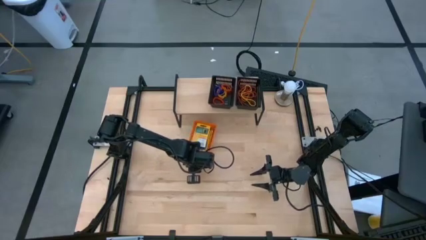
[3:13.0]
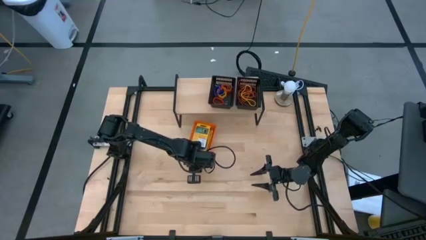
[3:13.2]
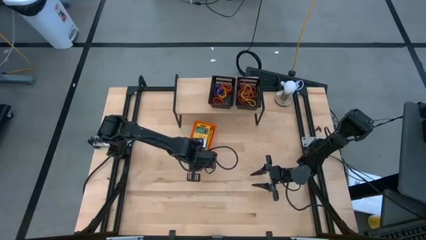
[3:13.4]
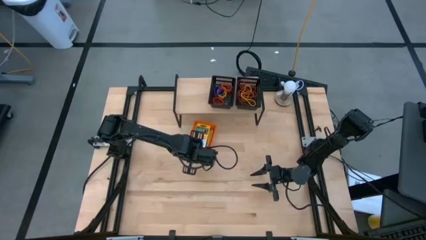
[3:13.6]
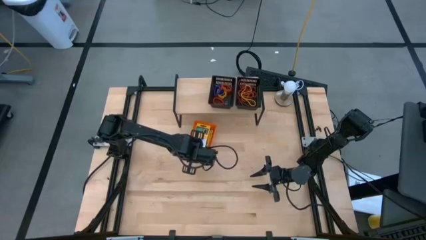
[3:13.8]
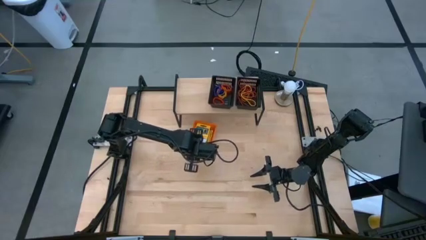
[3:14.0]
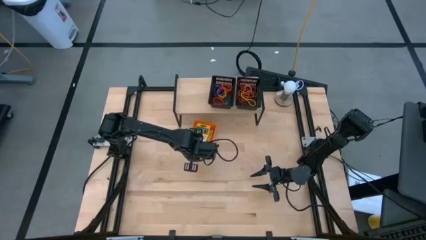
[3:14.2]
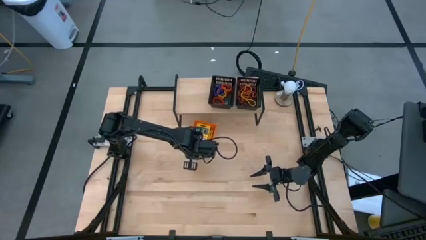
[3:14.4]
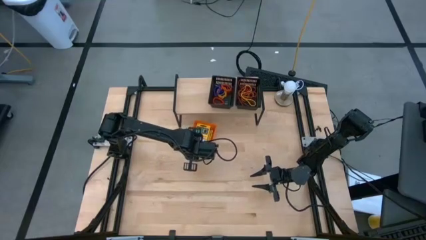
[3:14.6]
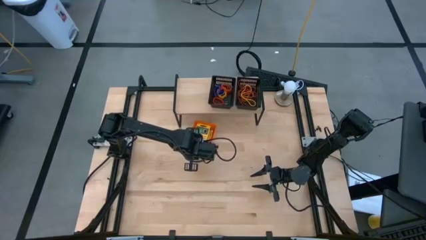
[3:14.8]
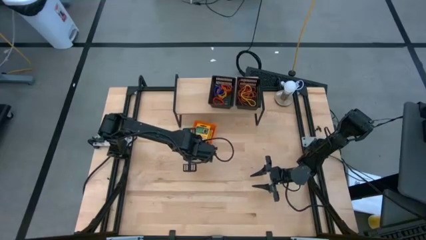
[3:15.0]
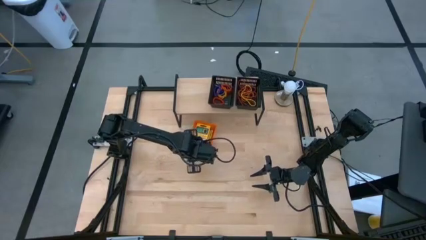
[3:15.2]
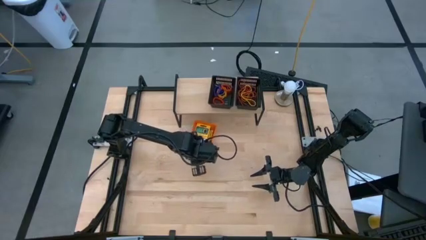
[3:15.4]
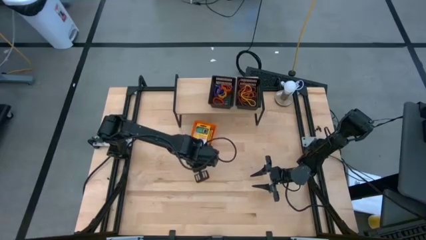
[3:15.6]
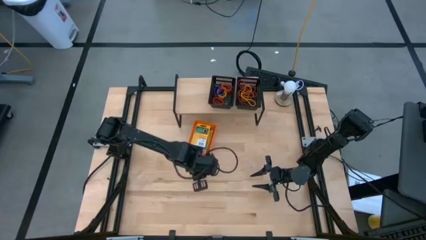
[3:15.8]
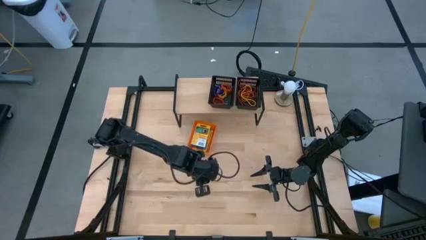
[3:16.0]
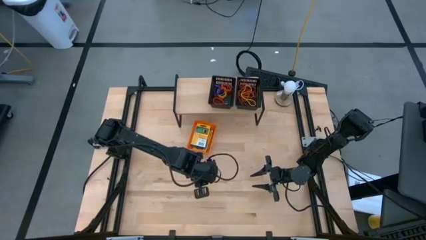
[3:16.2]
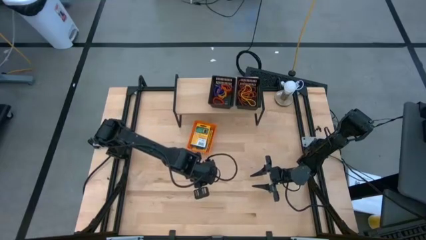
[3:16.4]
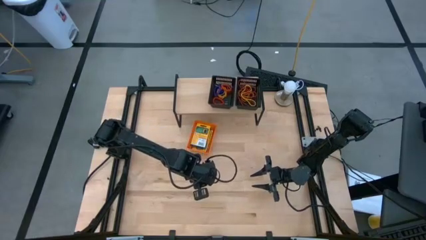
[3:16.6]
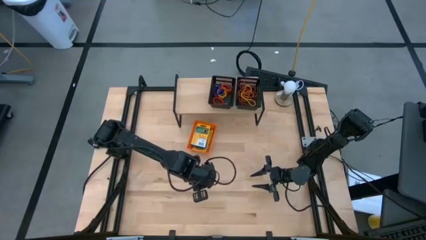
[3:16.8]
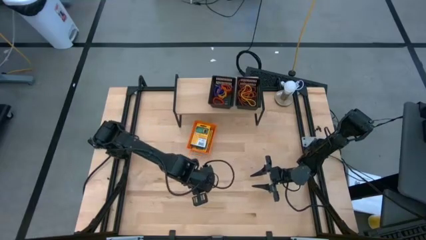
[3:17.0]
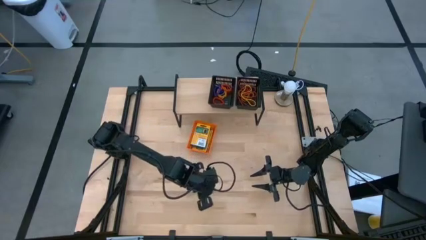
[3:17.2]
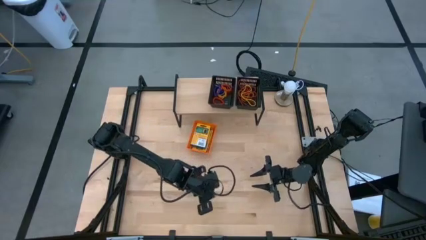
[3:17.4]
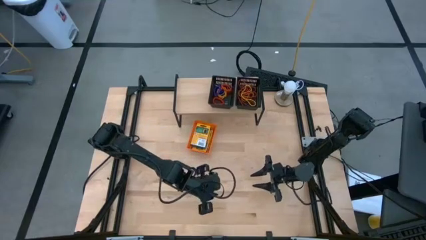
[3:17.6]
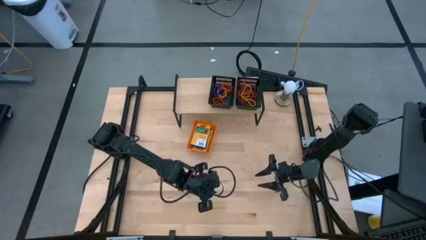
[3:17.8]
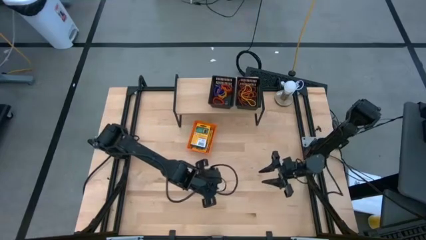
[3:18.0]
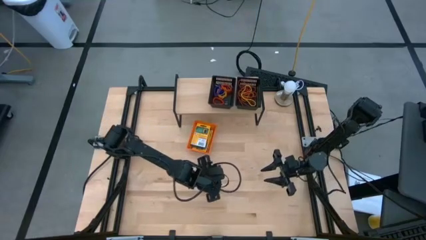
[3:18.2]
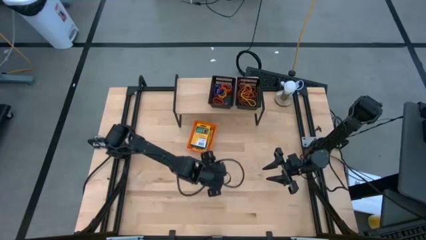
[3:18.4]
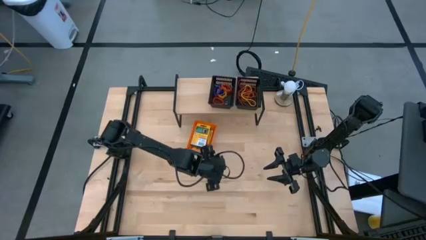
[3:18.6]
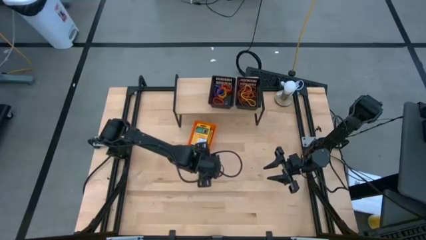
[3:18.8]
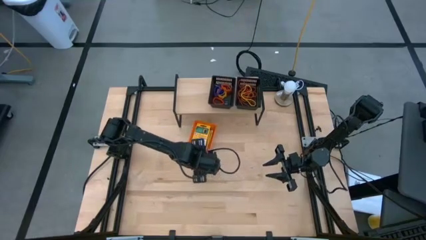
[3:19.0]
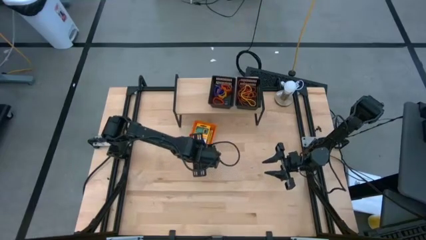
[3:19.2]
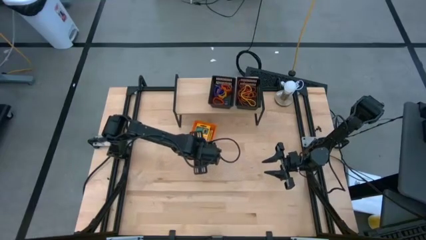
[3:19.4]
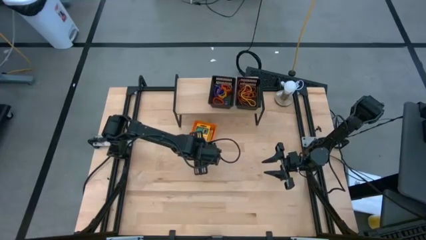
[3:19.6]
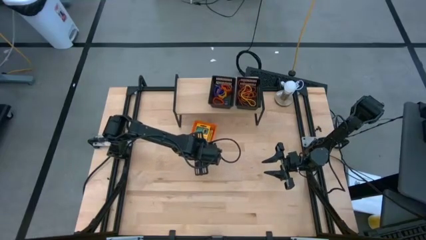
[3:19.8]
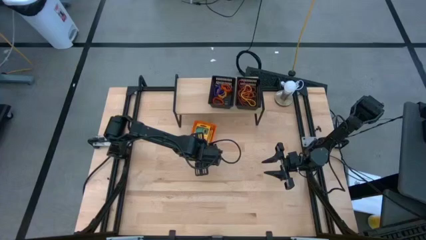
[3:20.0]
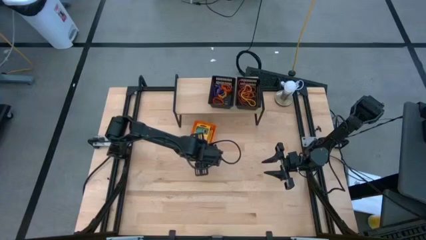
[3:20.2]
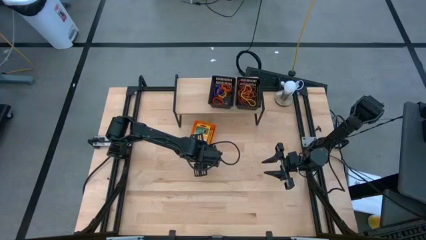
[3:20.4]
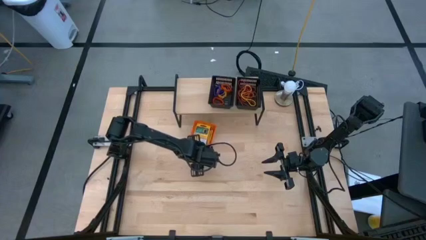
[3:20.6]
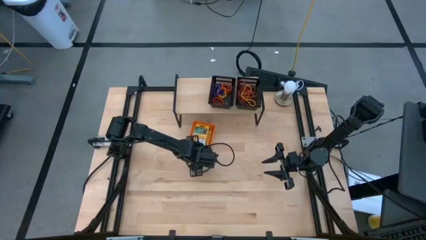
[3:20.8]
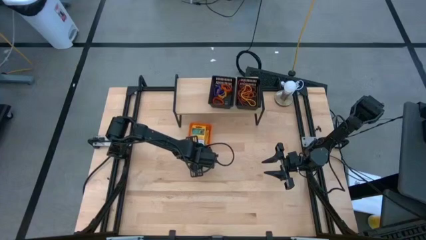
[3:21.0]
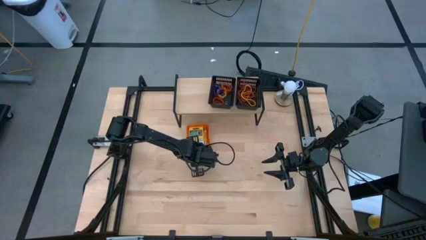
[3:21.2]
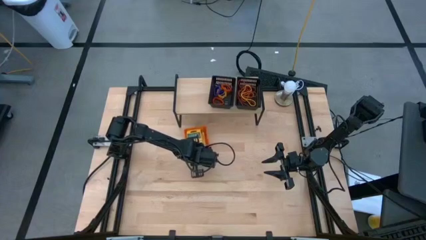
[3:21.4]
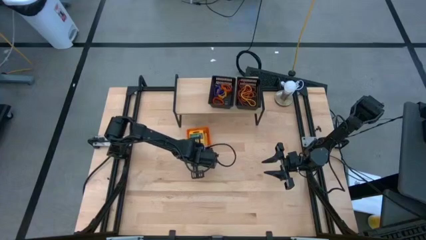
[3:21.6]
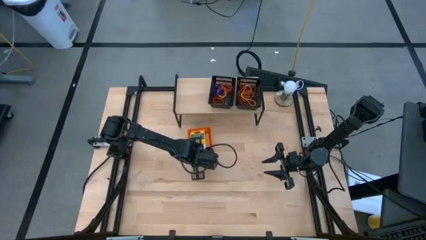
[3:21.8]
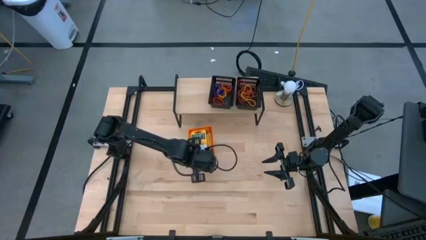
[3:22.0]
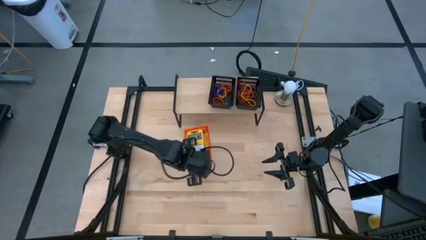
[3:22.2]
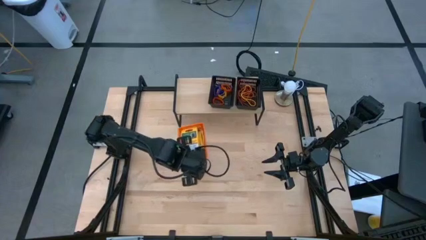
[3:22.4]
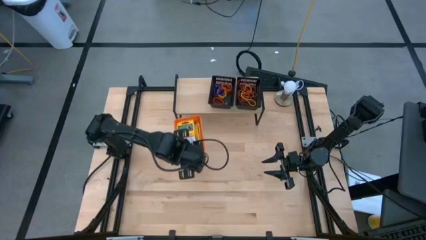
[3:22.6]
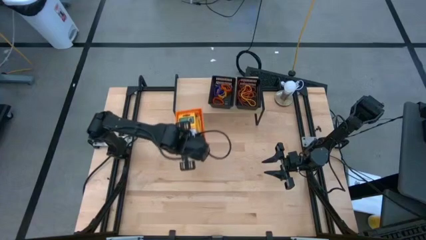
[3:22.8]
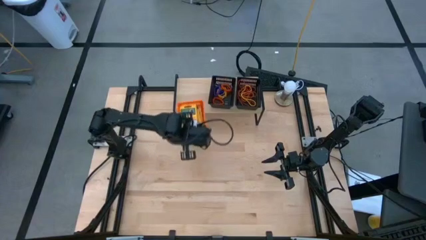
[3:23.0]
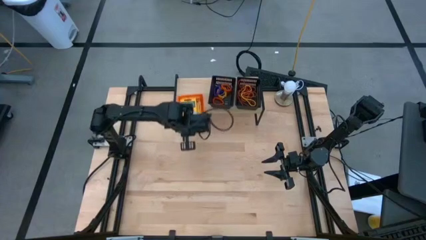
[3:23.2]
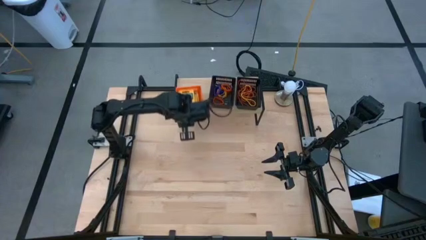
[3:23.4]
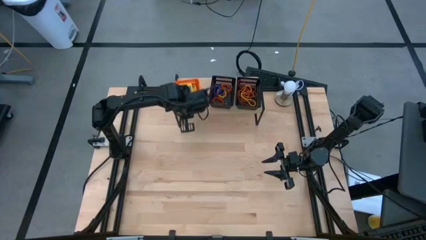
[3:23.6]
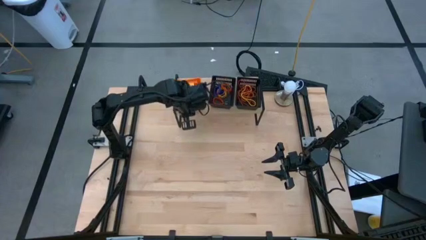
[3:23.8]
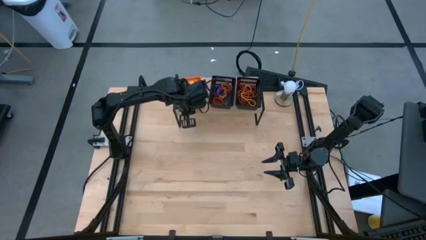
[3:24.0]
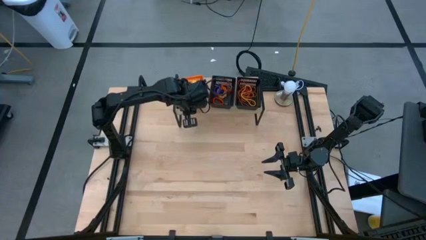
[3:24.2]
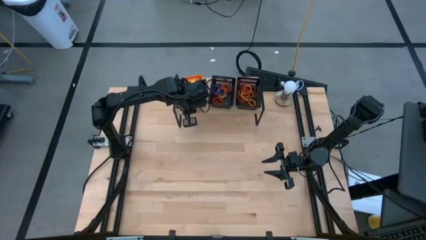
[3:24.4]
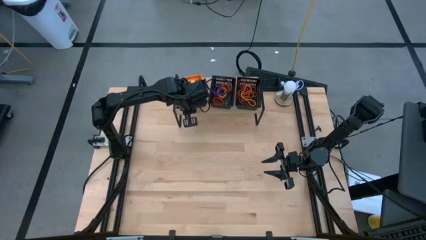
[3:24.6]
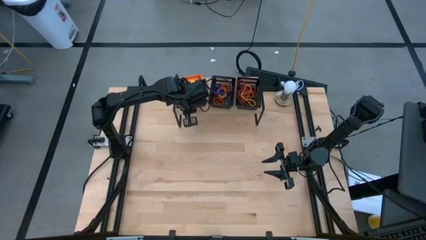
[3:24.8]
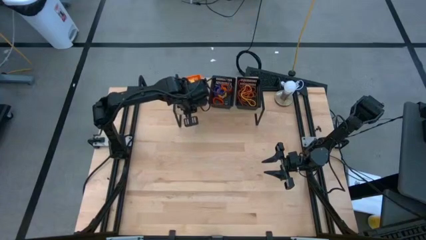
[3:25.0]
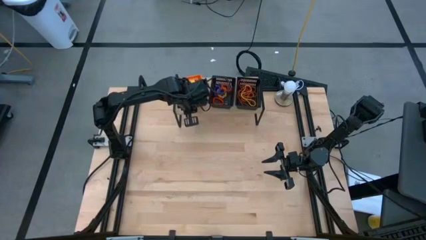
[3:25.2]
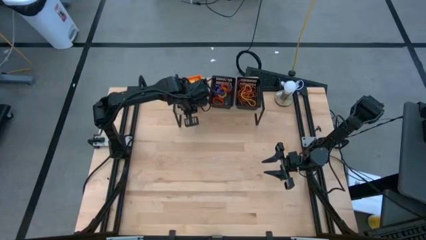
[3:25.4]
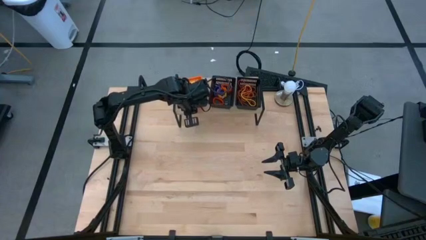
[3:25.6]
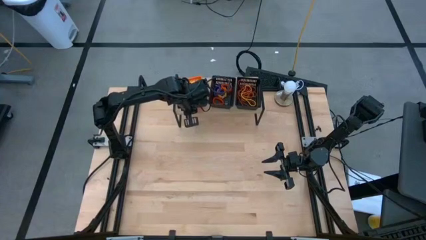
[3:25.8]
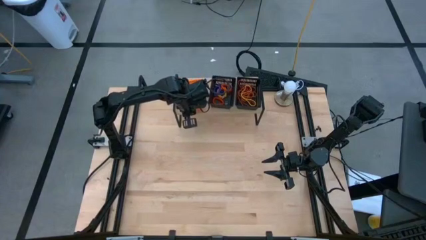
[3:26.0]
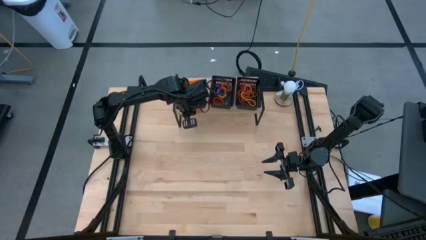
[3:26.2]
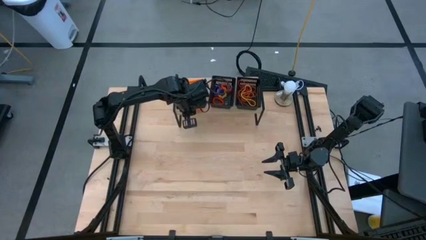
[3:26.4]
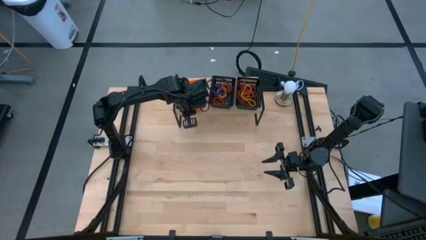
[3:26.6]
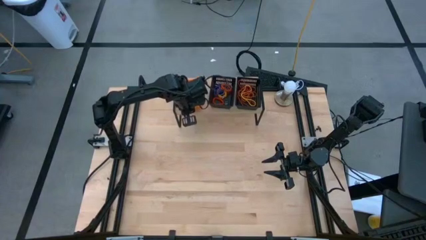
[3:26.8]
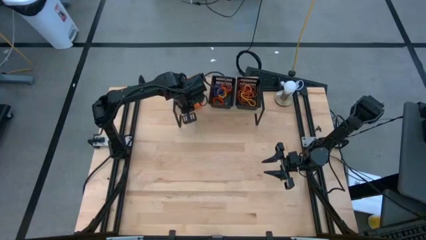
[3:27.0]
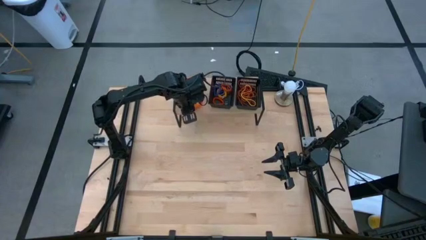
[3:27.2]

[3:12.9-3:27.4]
Task: Pick & Place Office Desk Supplies
Put the orange bin on the shelf
